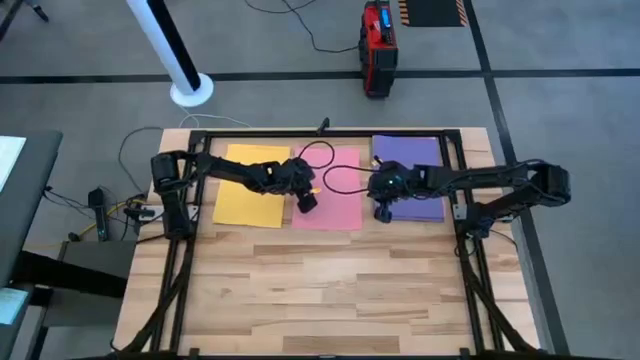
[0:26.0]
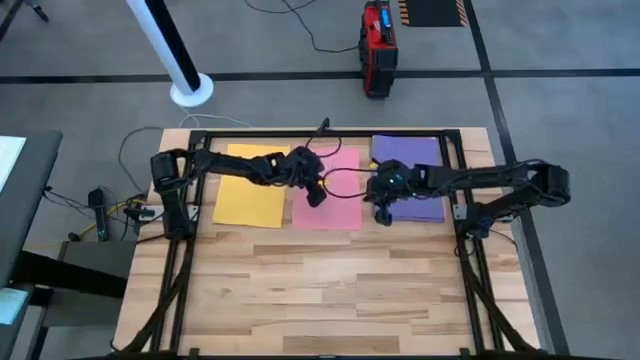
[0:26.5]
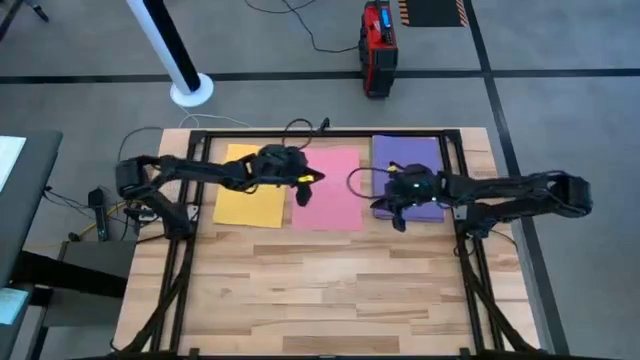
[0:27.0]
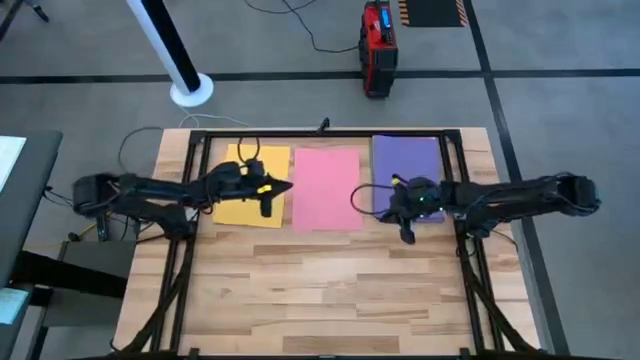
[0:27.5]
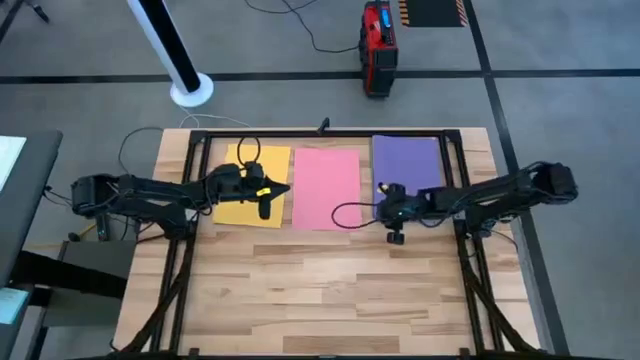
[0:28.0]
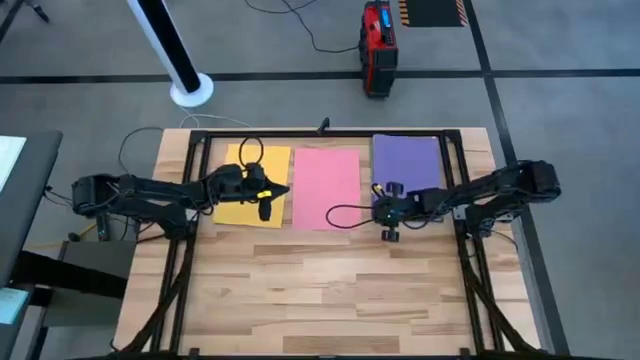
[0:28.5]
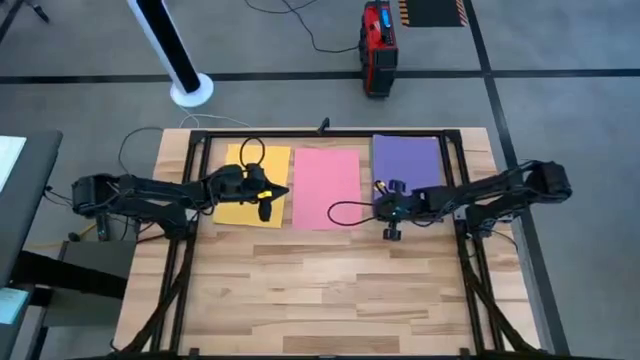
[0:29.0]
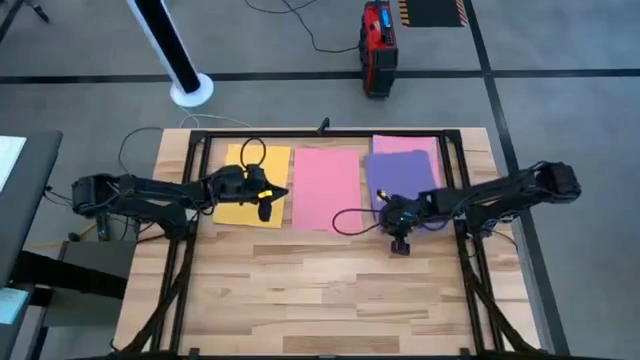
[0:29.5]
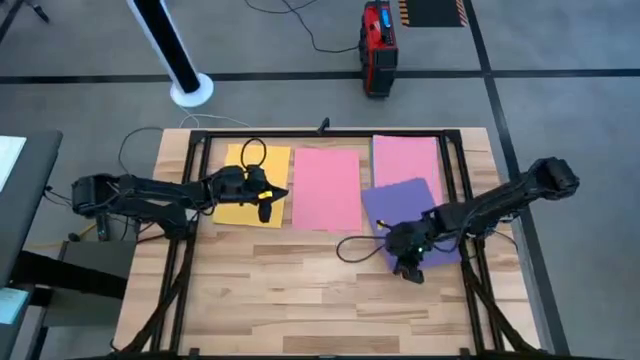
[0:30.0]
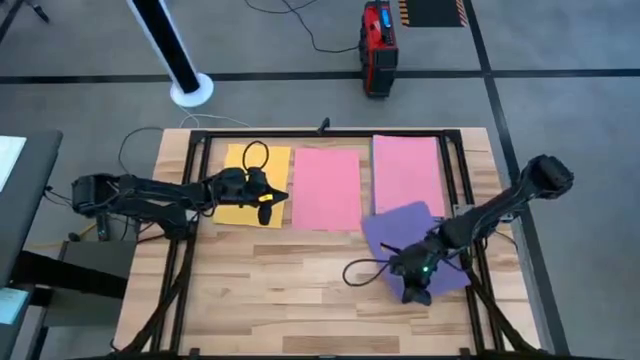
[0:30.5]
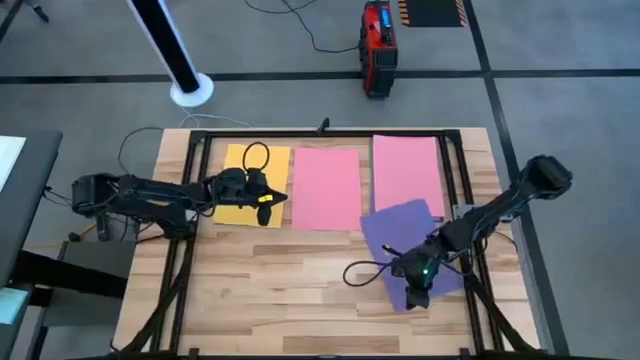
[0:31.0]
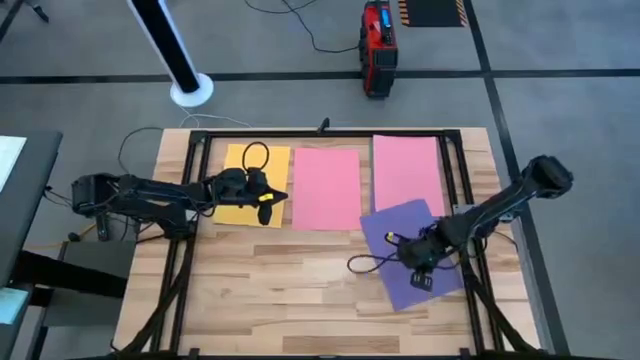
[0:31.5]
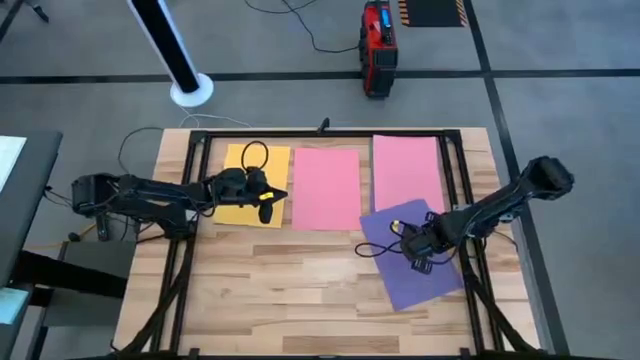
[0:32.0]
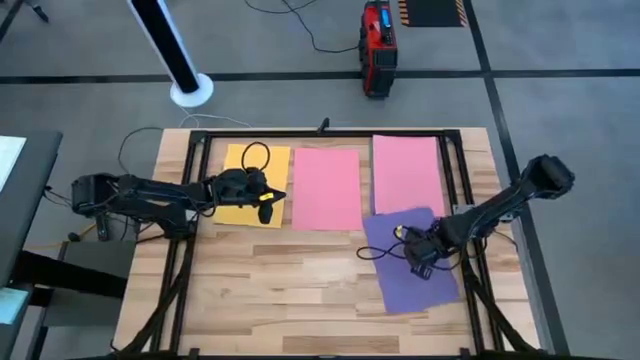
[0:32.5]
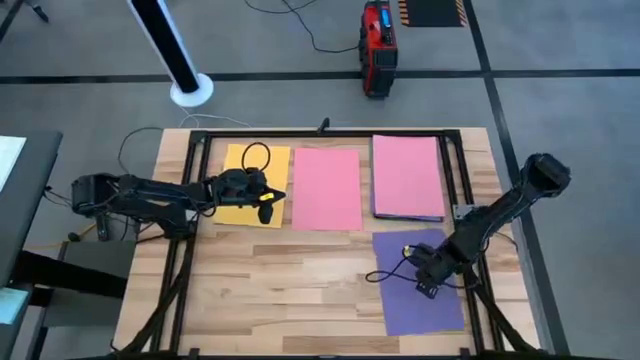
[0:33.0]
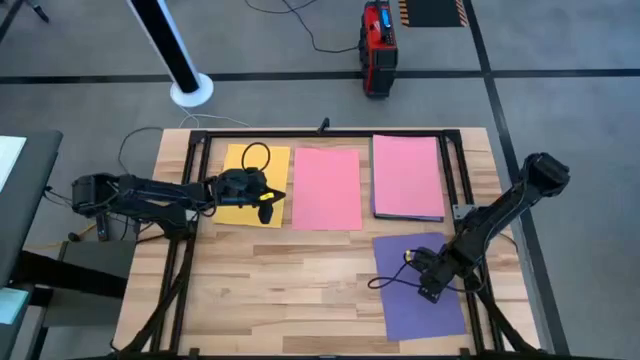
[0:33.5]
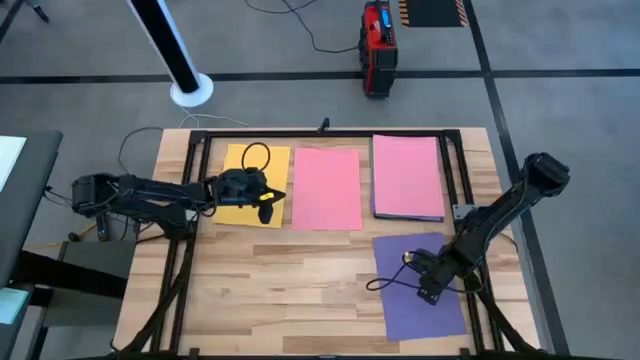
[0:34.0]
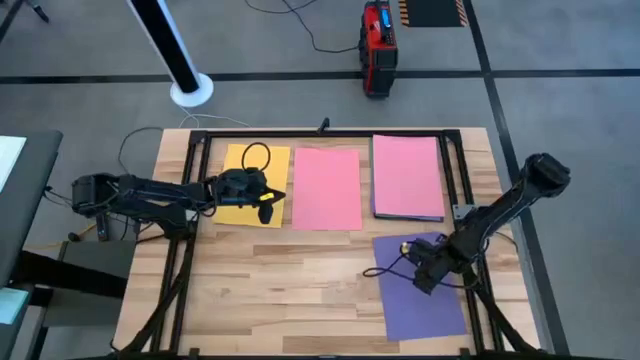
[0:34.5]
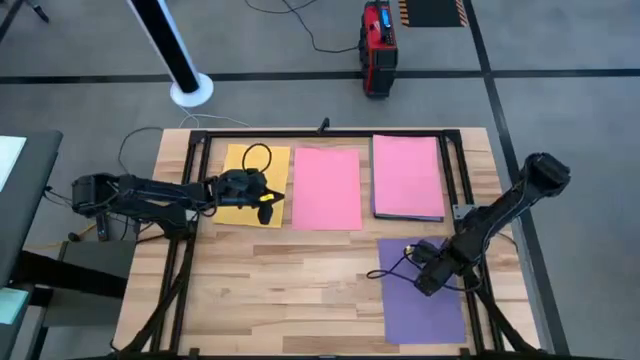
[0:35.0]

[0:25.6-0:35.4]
Task: Organize paper
Move the violet colored paper to the bottom right of the table

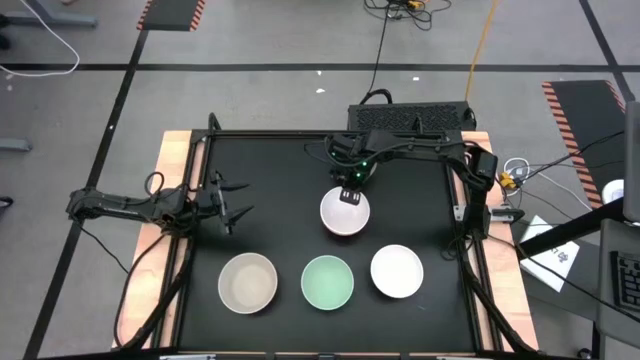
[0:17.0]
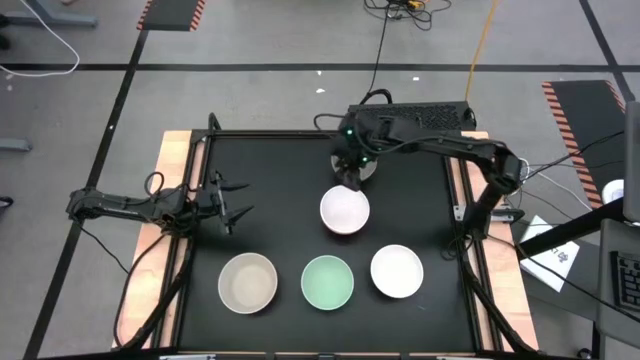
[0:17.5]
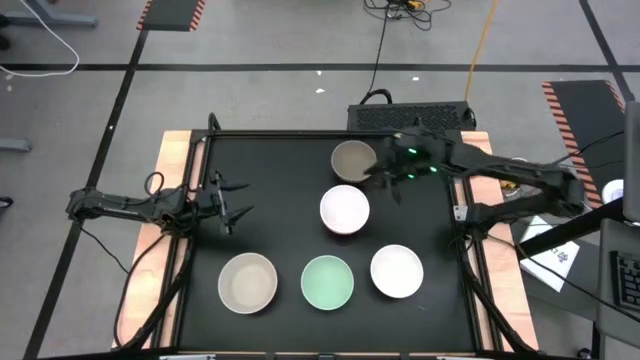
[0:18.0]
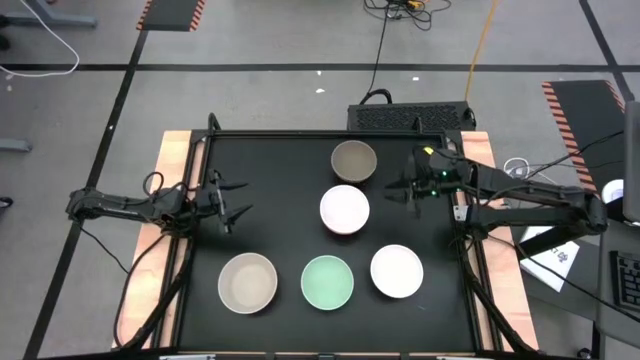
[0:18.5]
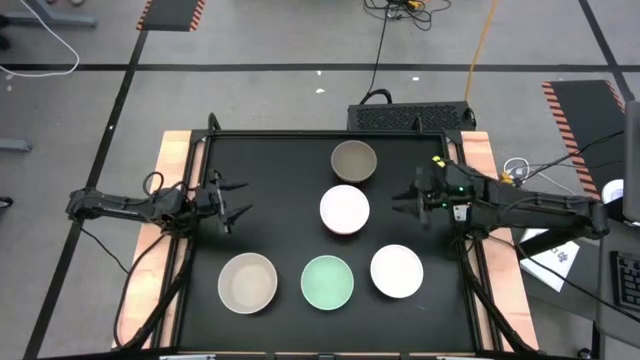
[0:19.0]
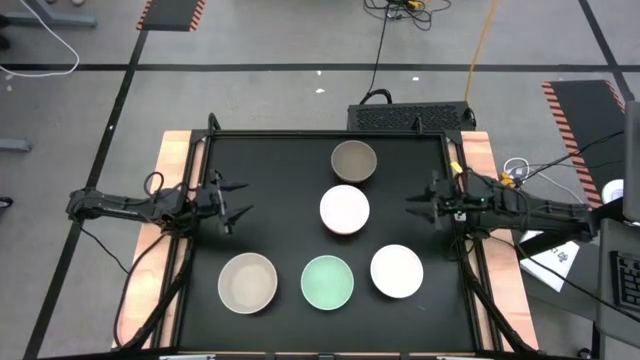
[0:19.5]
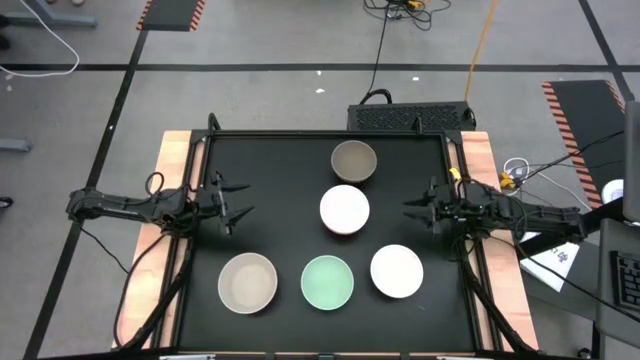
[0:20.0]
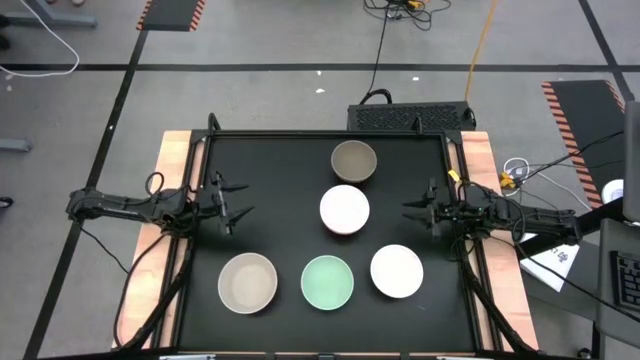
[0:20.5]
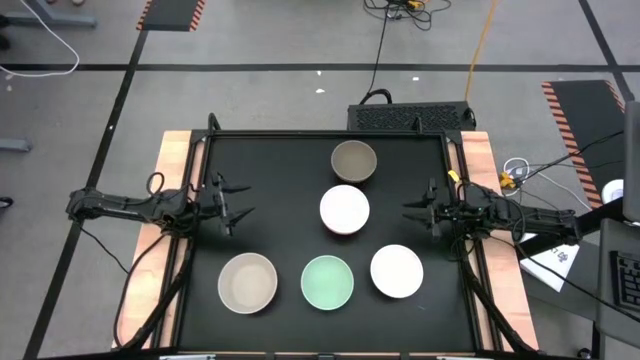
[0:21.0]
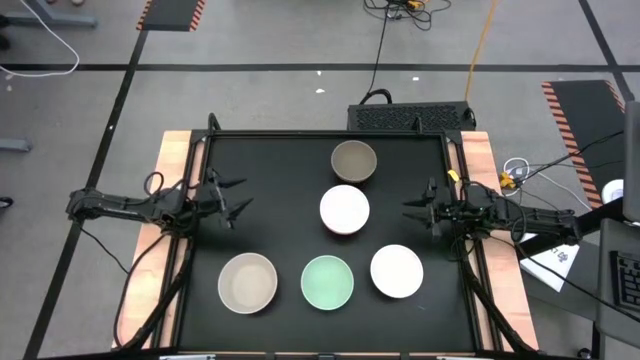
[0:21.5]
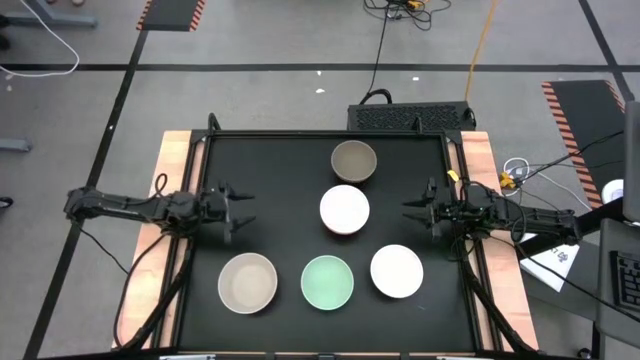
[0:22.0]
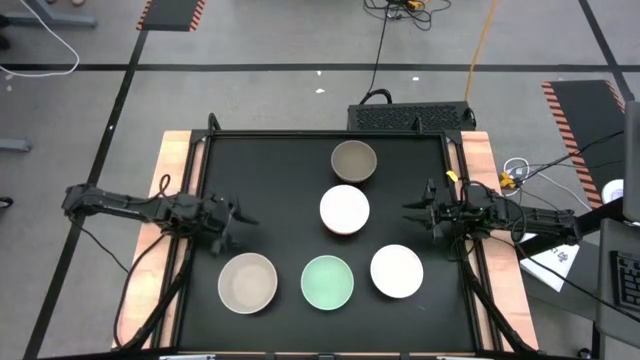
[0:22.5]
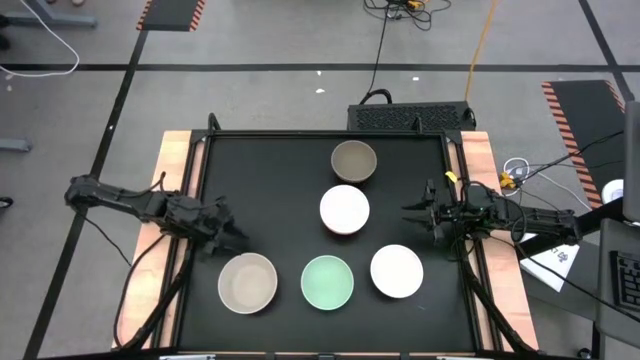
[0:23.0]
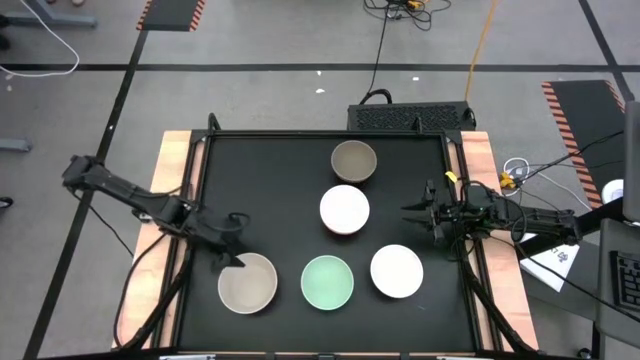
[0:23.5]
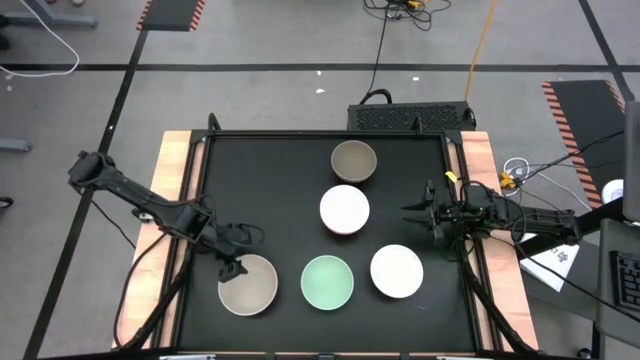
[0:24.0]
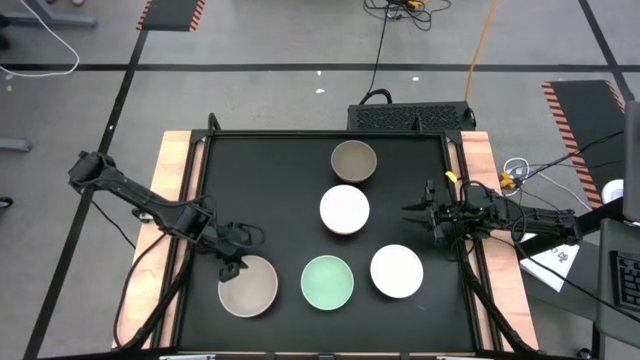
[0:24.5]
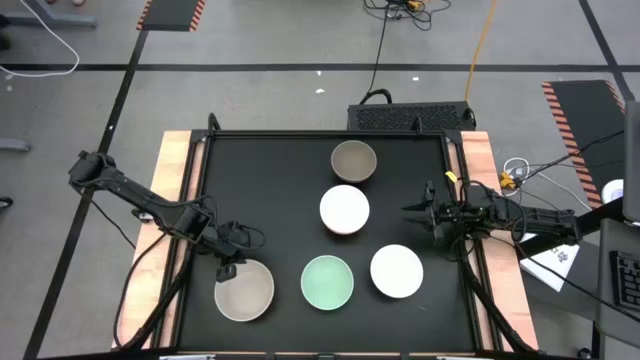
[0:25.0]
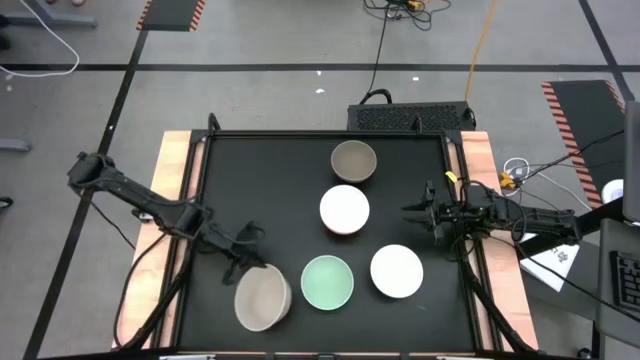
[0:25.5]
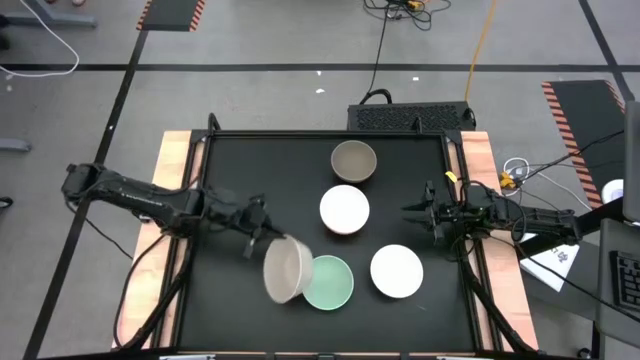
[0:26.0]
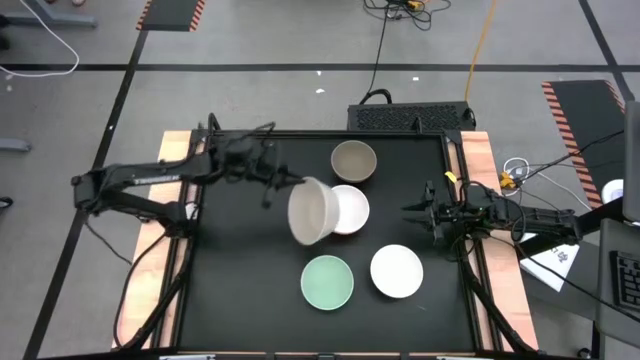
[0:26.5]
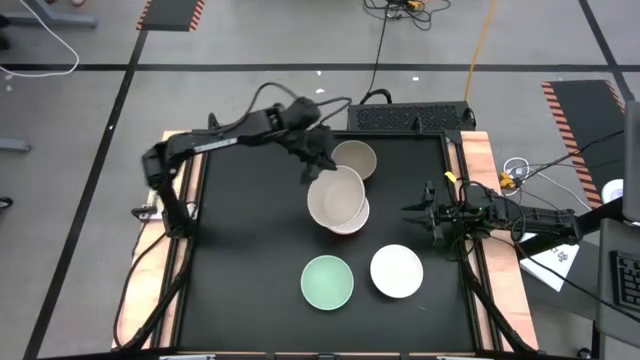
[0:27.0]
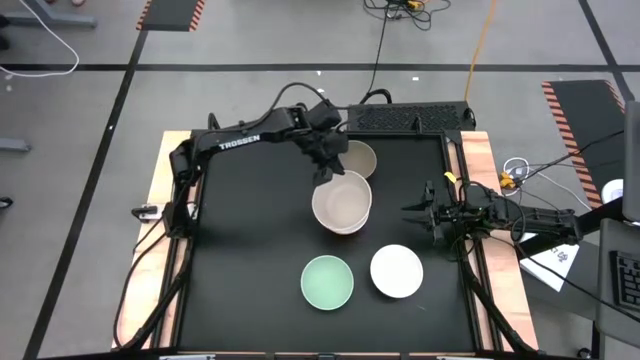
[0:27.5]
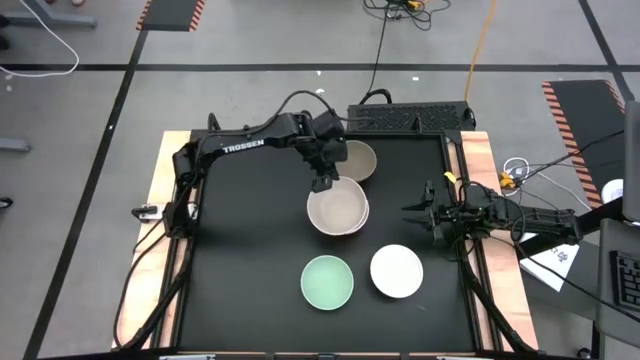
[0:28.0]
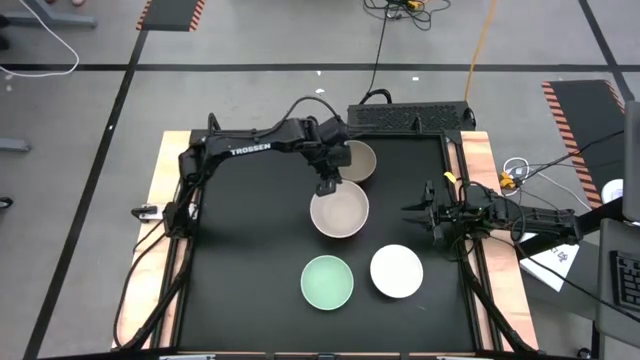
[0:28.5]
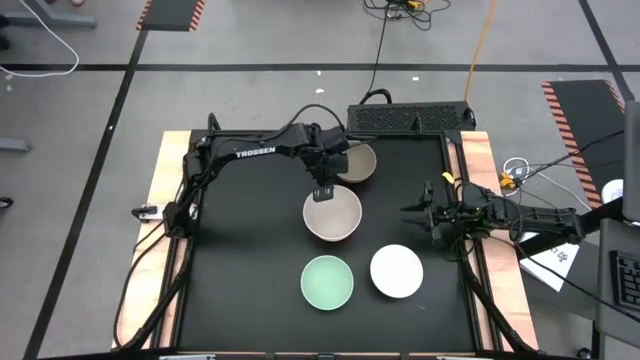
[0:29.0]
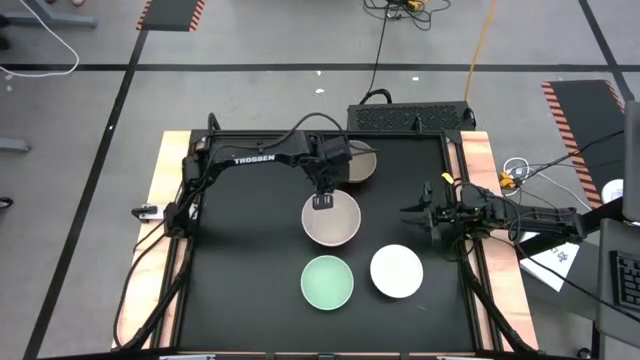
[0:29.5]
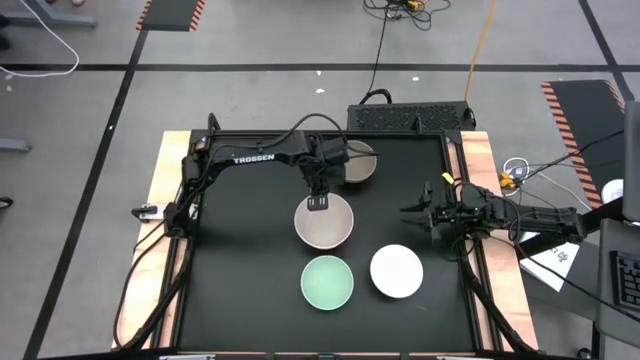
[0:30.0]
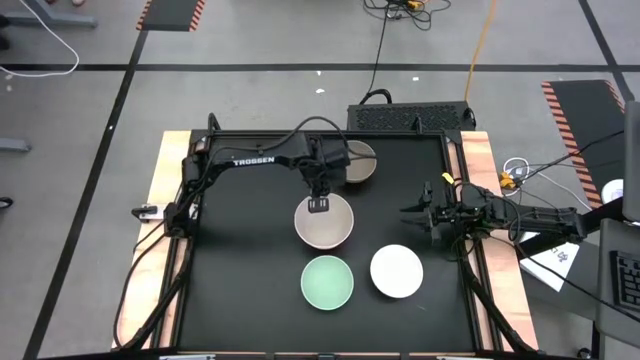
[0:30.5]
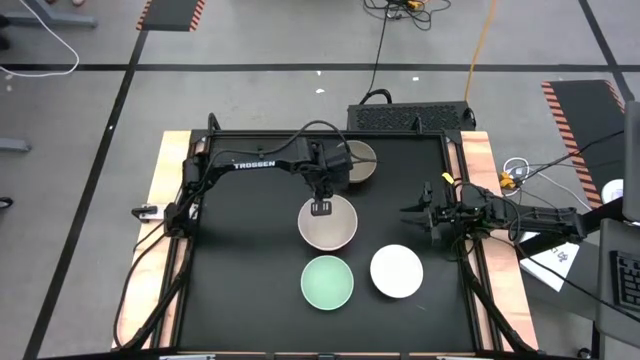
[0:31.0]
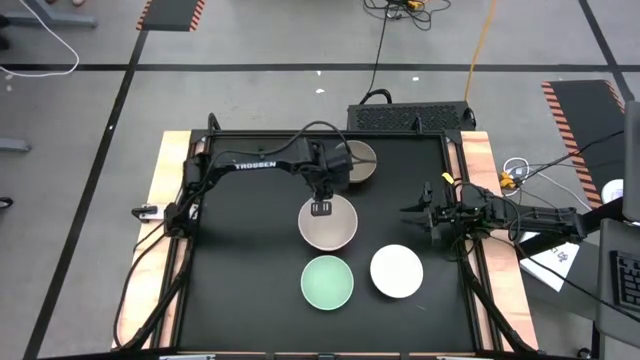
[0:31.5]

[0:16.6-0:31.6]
Task: Nest bowls inside each other
Stack the light gray bowl on the top white bowl
